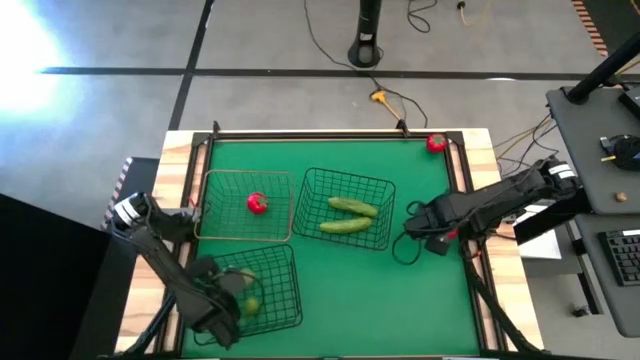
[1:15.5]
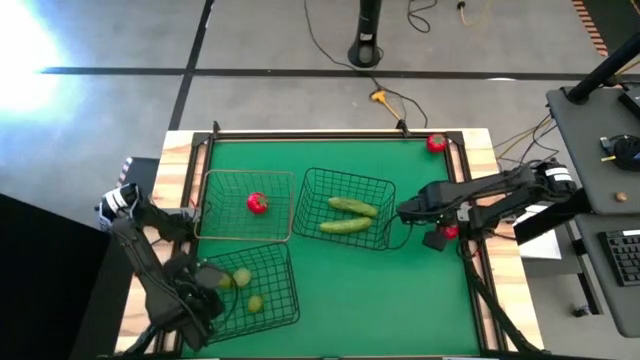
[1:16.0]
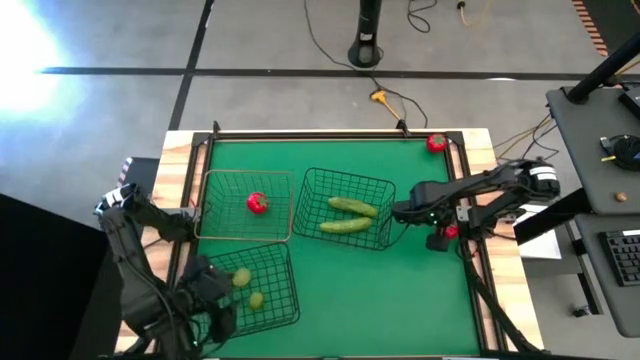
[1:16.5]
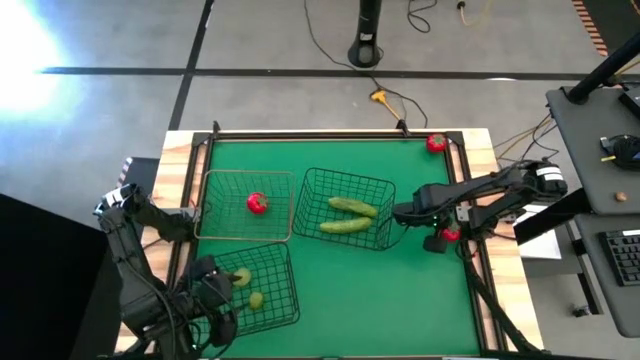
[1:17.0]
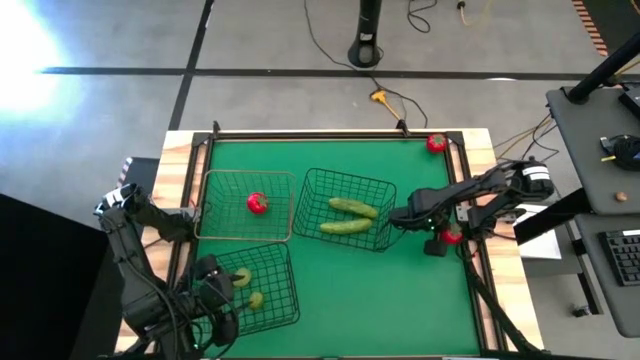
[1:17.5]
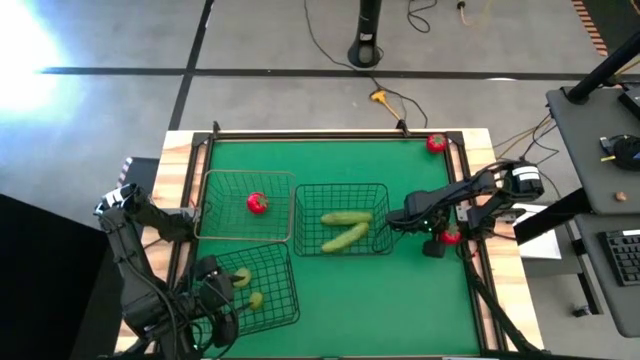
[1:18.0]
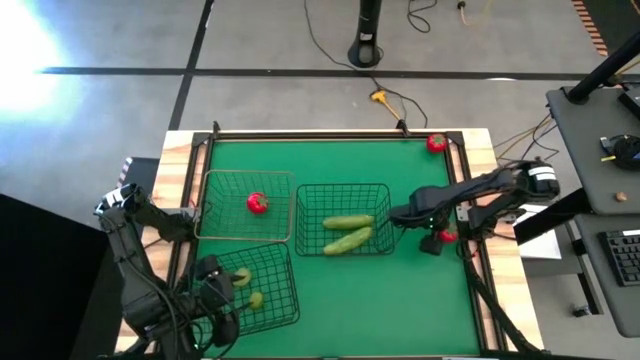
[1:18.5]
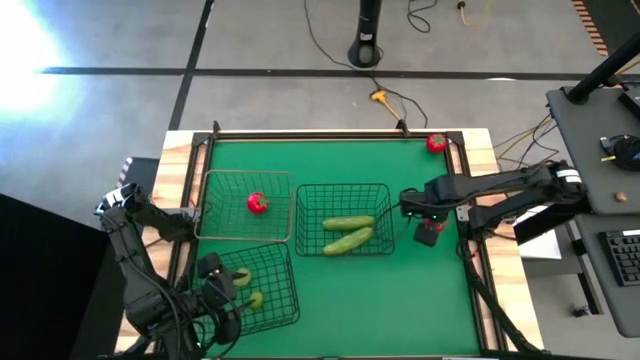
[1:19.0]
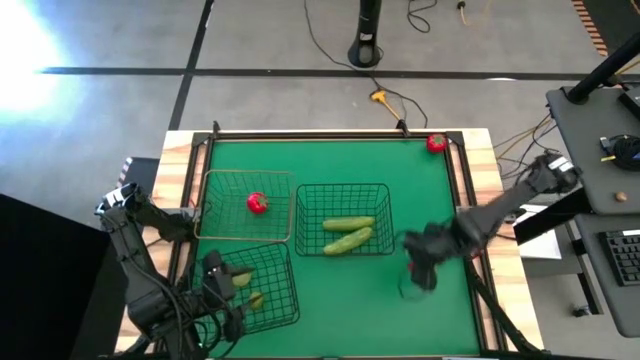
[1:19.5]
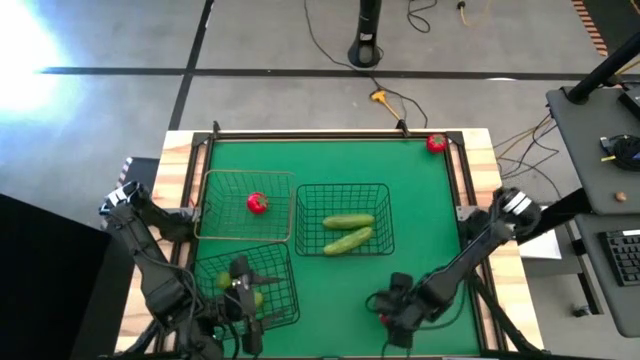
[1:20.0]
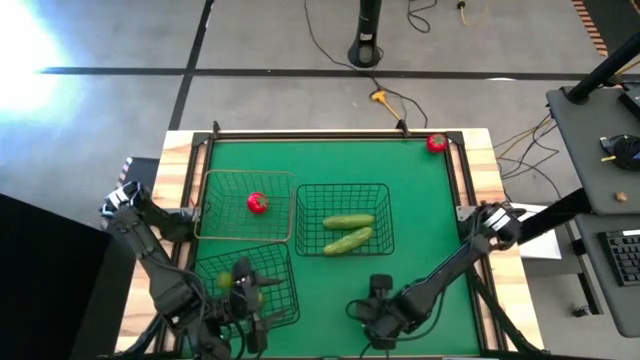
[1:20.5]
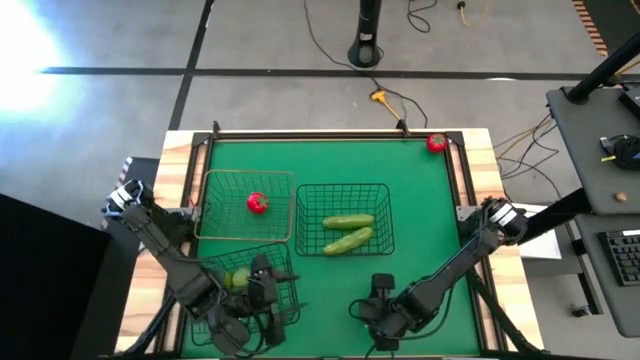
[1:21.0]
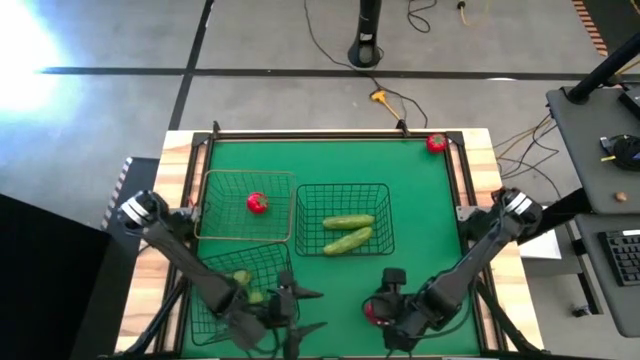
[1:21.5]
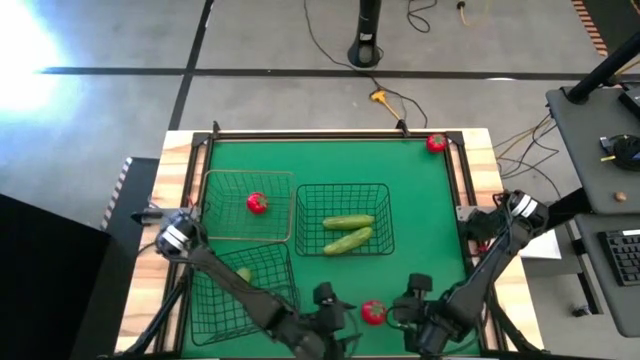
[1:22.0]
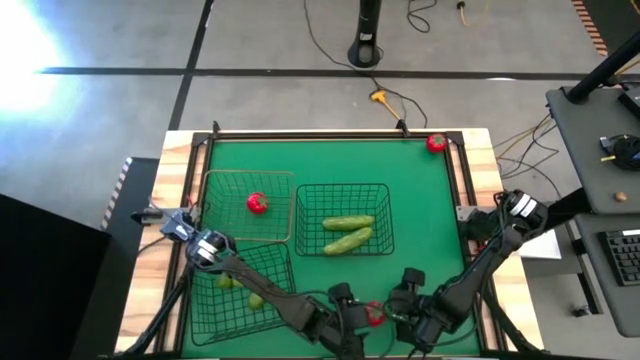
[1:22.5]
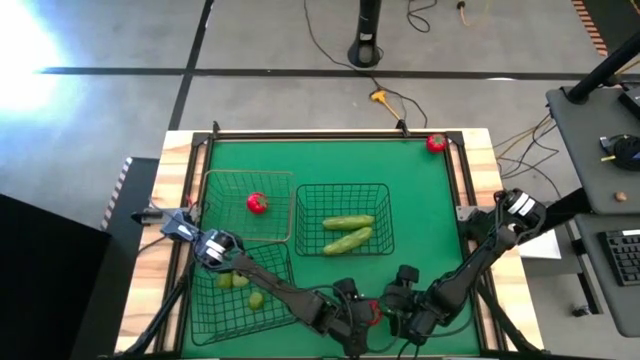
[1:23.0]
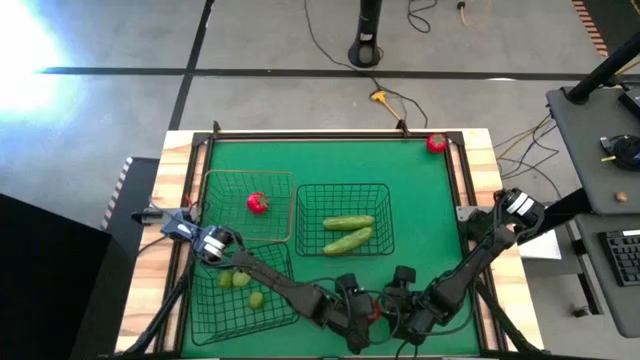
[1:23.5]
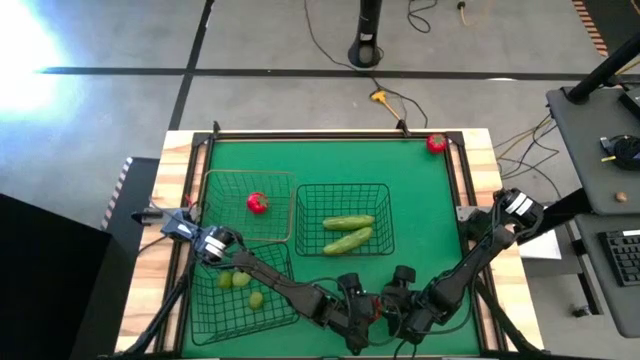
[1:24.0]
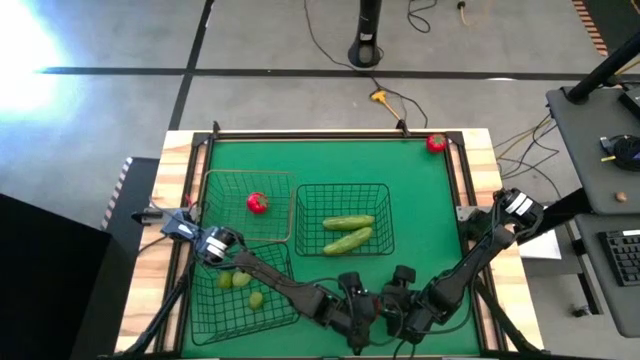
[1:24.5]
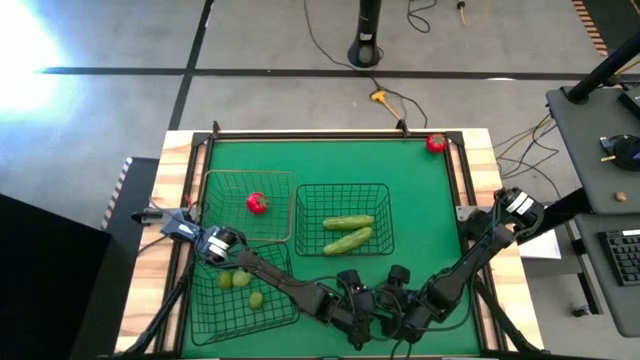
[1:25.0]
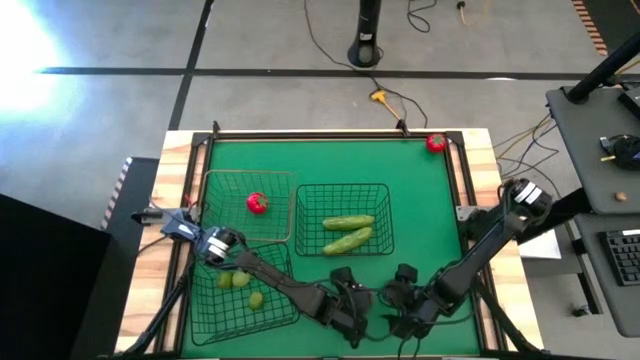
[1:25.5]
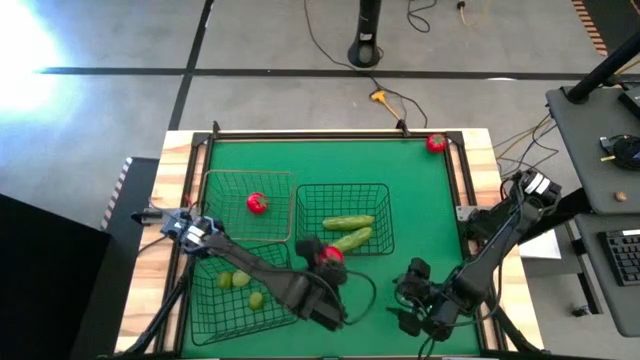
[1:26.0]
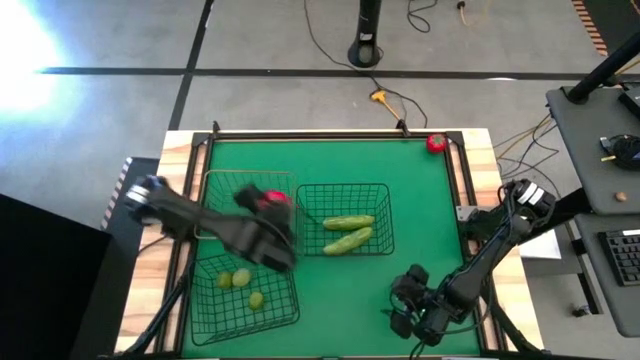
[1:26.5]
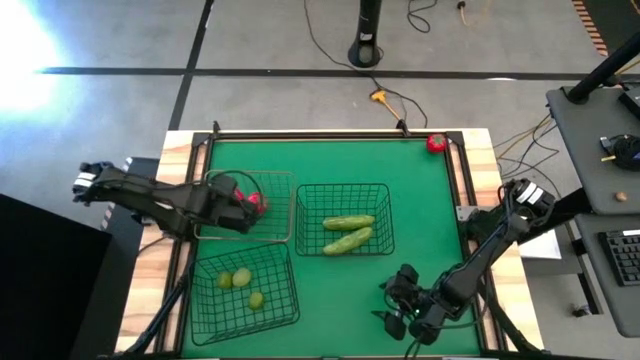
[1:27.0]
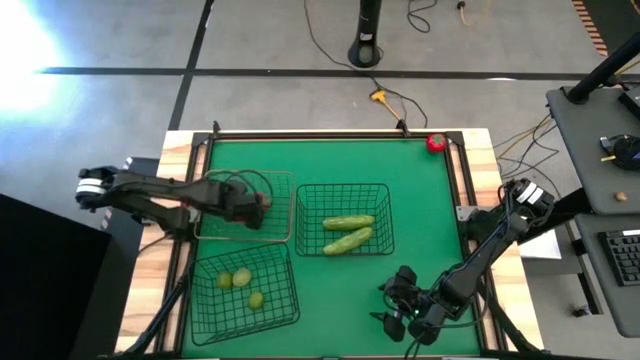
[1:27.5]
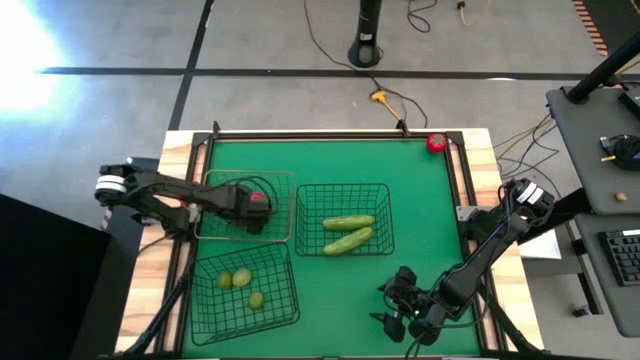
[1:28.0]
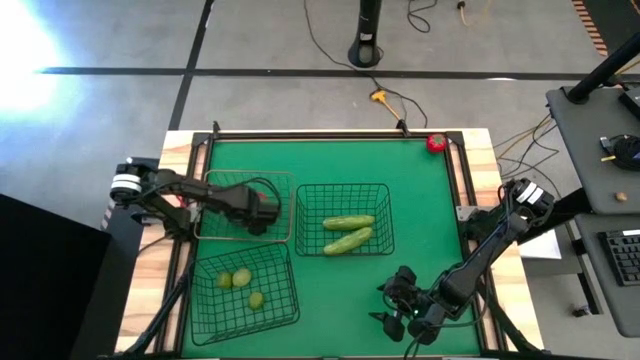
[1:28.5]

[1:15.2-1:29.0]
Task: Sort produce into baskets
Put the bottom tomato into the gold wire basket

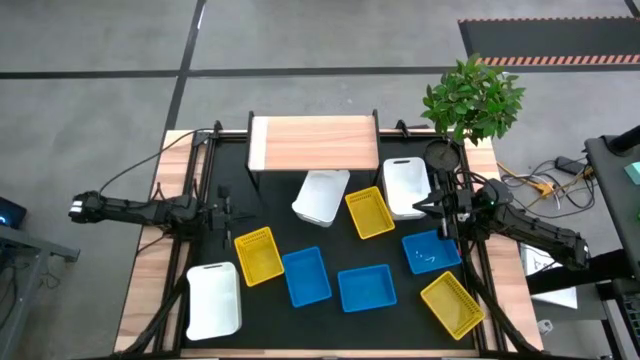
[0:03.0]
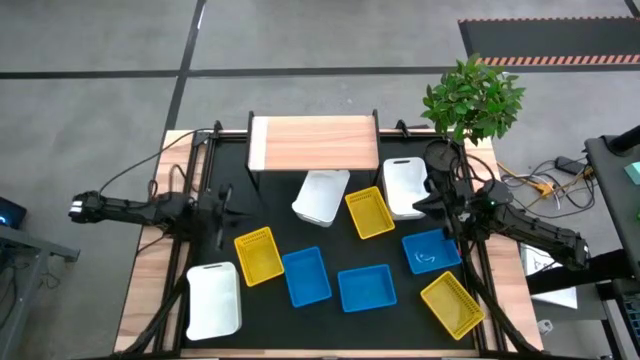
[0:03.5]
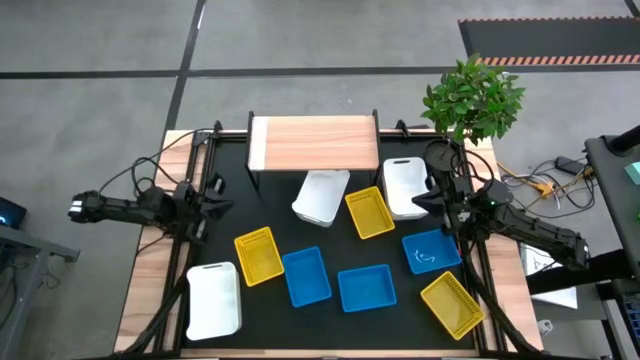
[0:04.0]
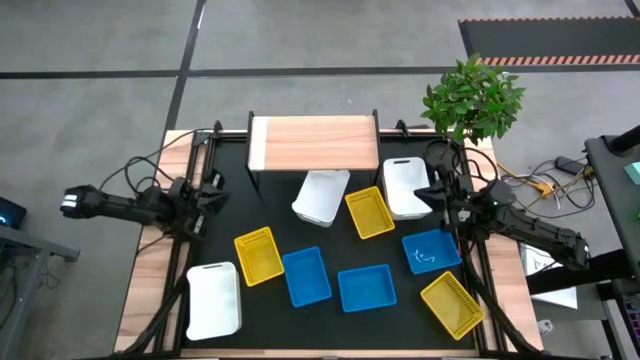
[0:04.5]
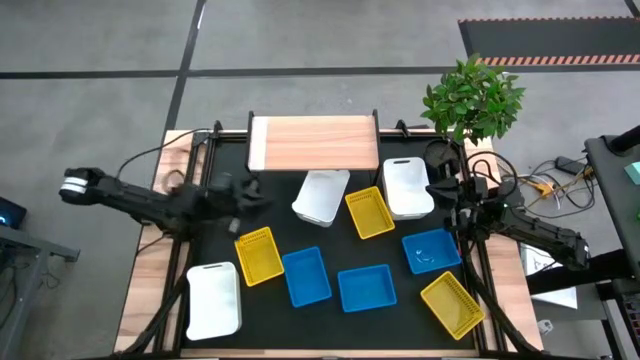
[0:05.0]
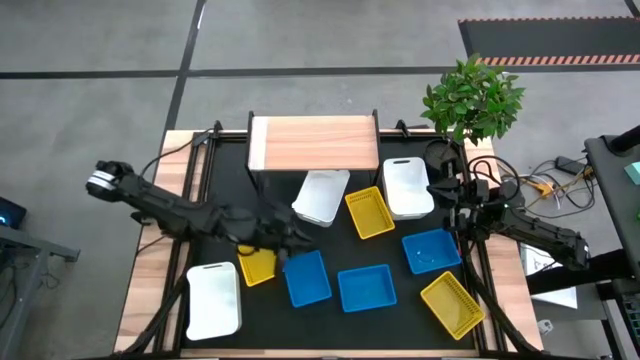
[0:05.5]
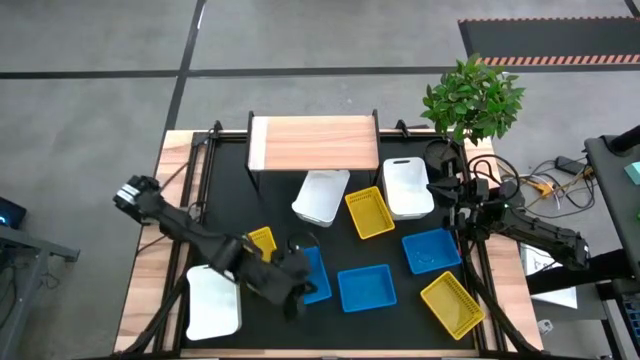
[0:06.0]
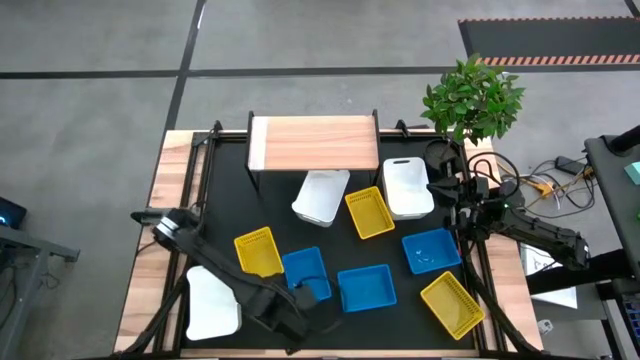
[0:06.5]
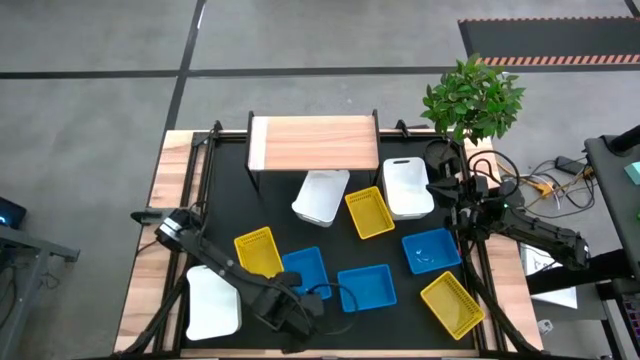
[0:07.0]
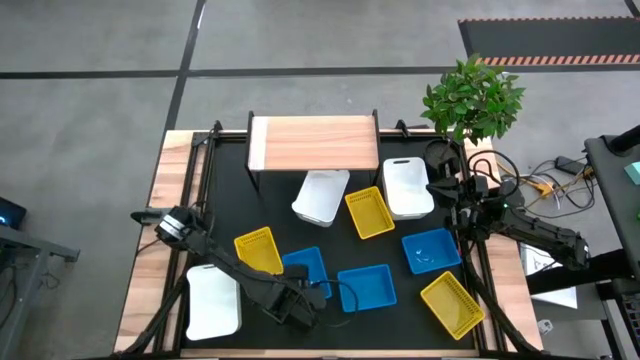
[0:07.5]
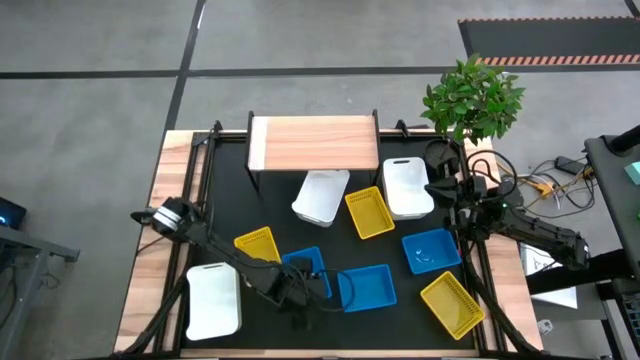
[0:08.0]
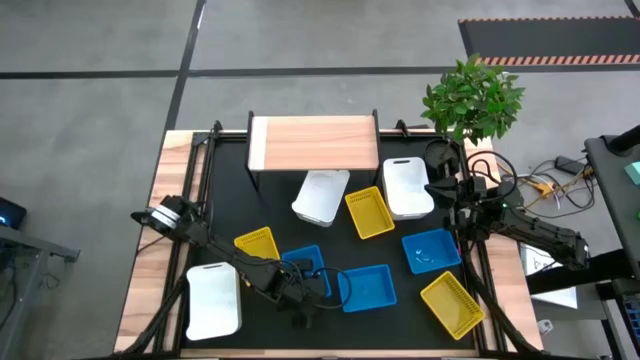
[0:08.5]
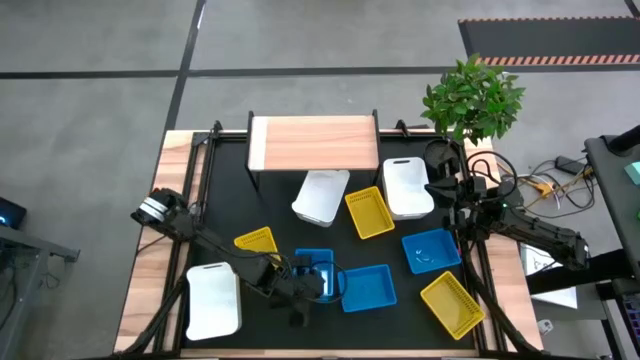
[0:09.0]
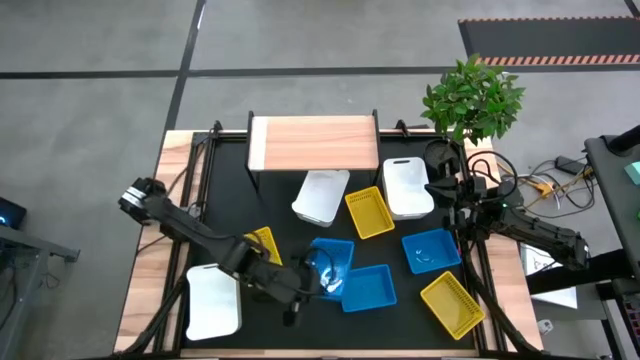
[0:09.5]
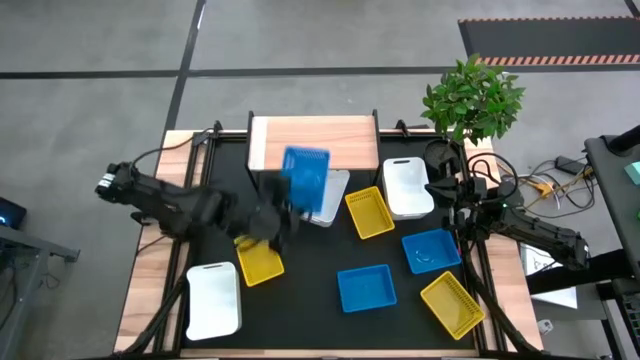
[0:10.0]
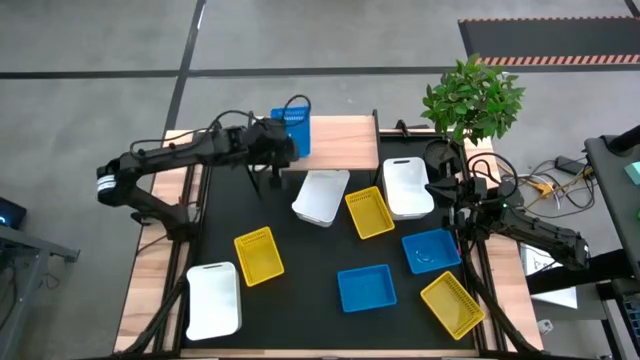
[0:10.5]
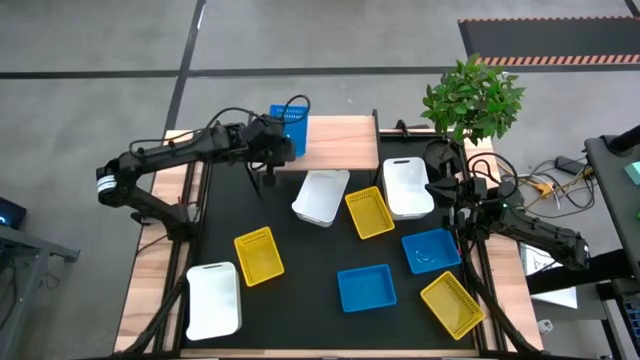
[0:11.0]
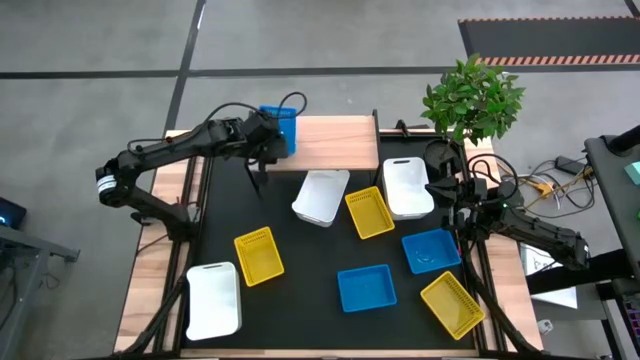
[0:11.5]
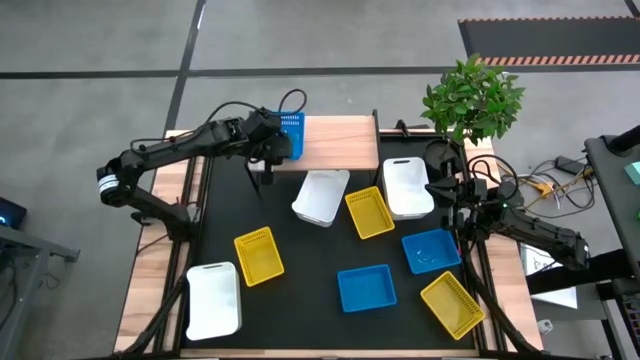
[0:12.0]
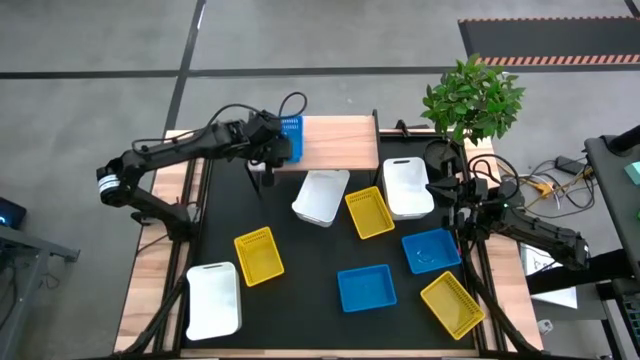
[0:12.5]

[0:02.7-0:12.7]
Task: Stack baskets on shelf by color
Put the left blue bin on the shelf
